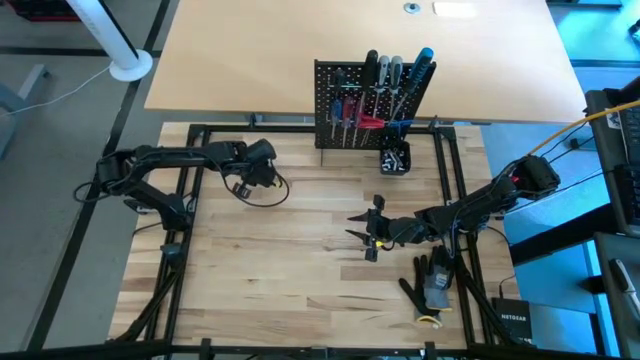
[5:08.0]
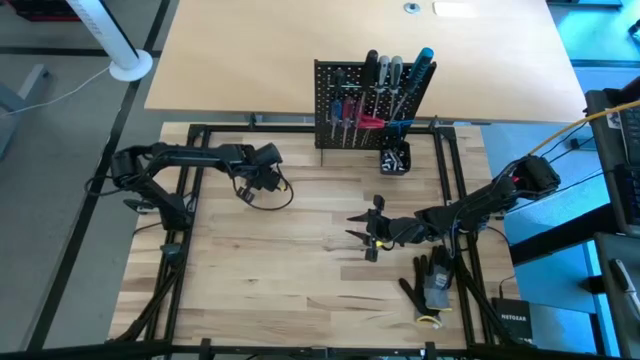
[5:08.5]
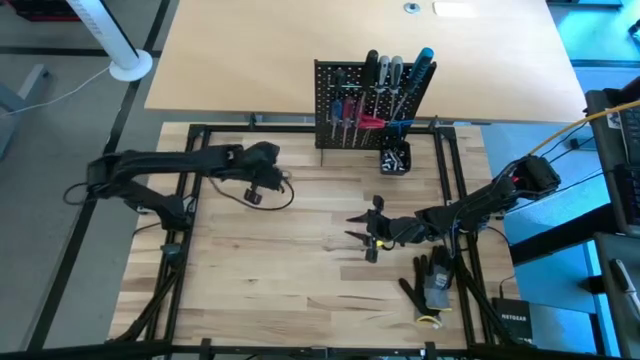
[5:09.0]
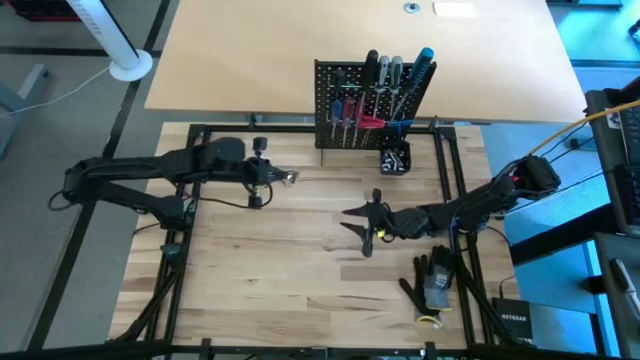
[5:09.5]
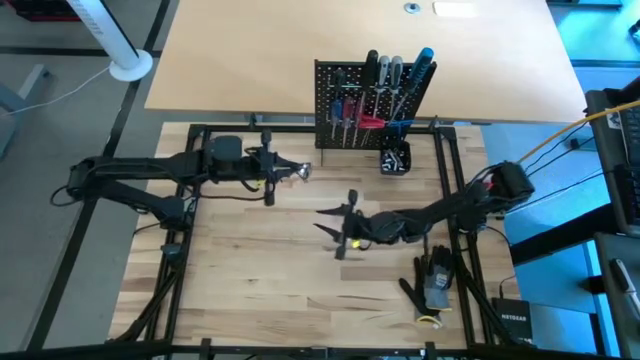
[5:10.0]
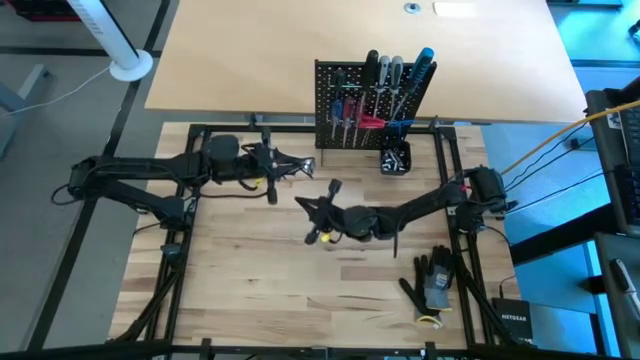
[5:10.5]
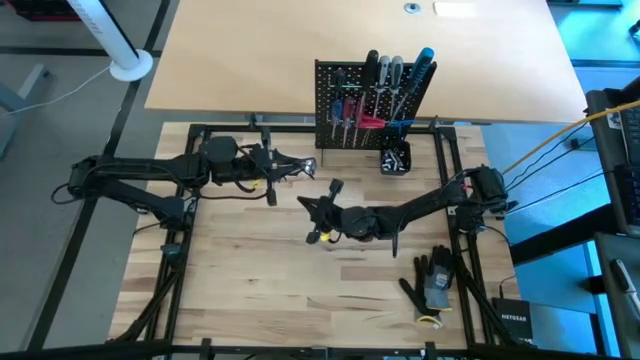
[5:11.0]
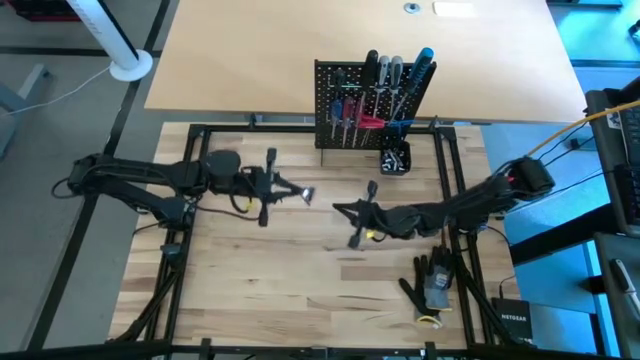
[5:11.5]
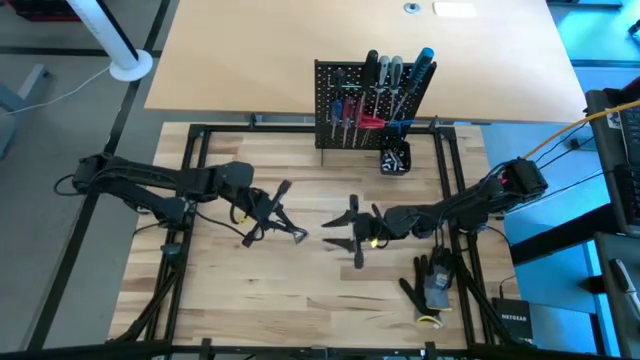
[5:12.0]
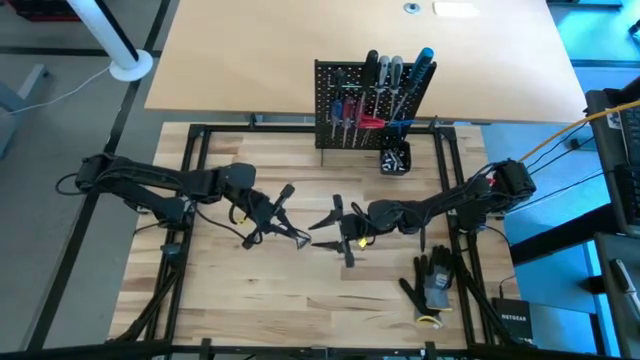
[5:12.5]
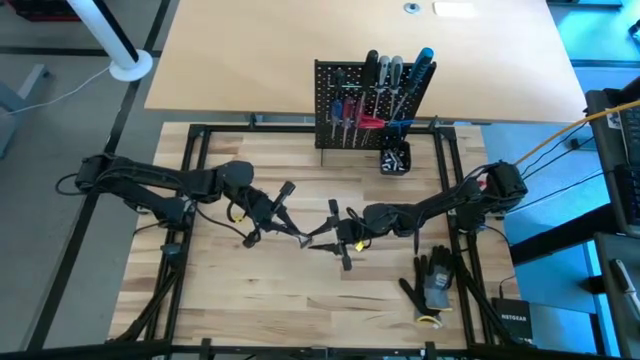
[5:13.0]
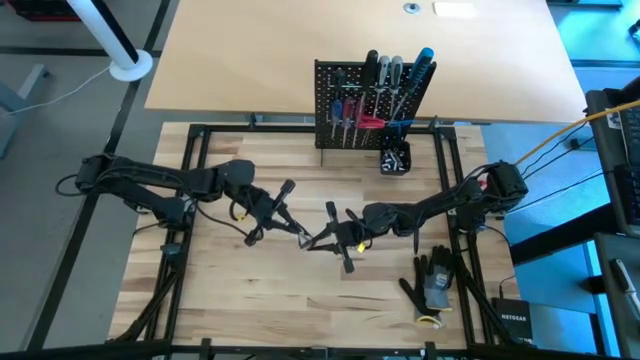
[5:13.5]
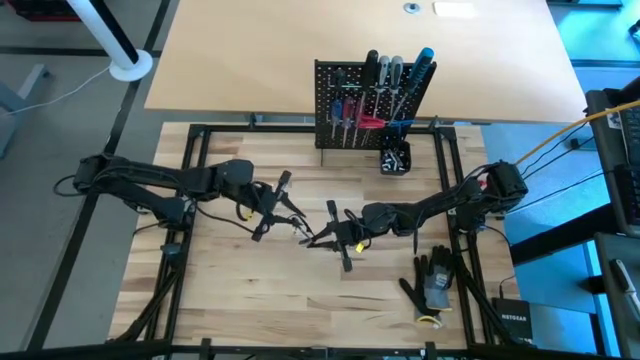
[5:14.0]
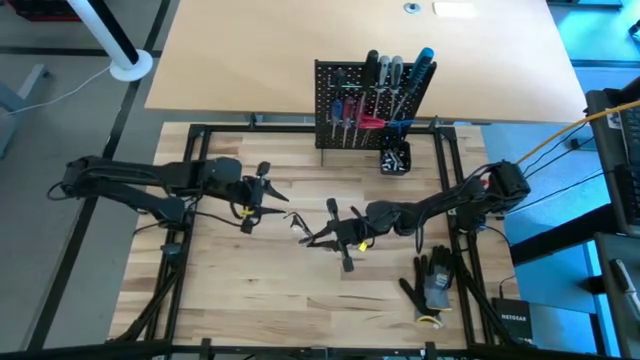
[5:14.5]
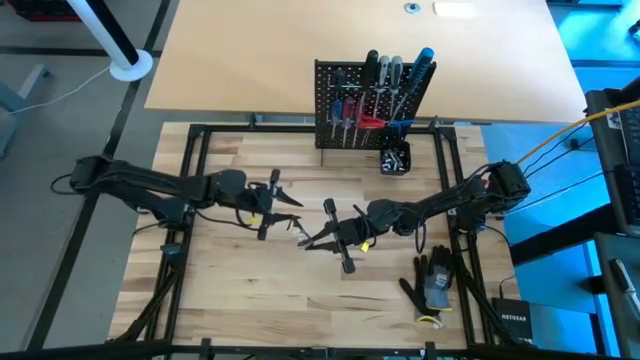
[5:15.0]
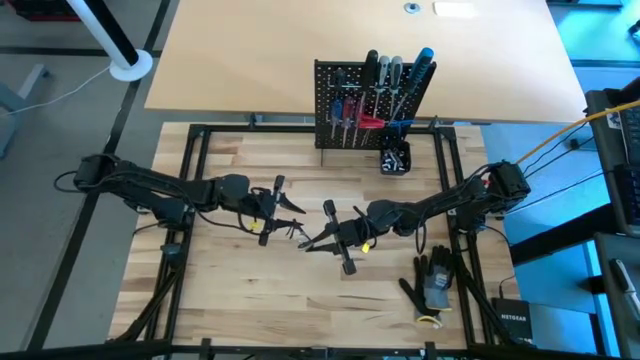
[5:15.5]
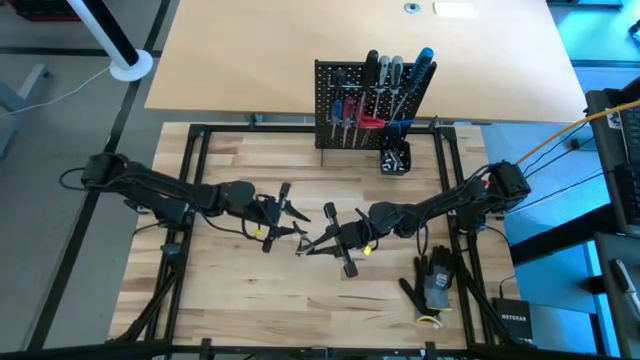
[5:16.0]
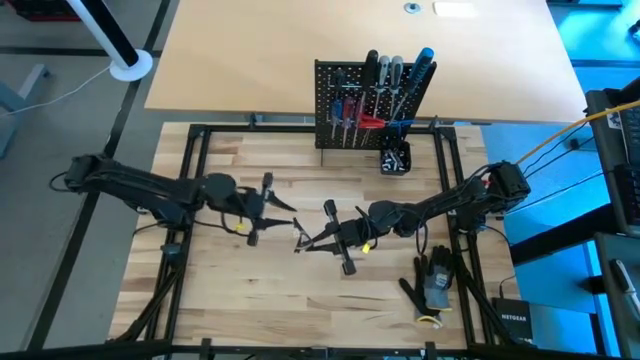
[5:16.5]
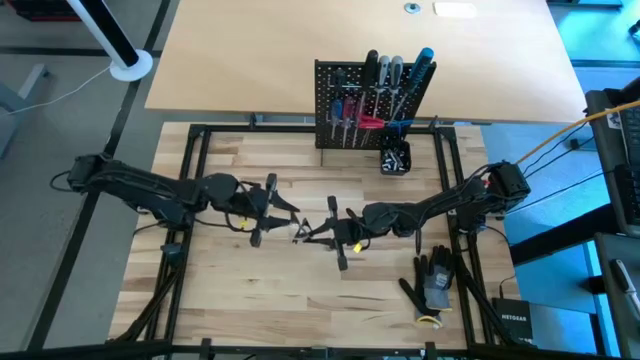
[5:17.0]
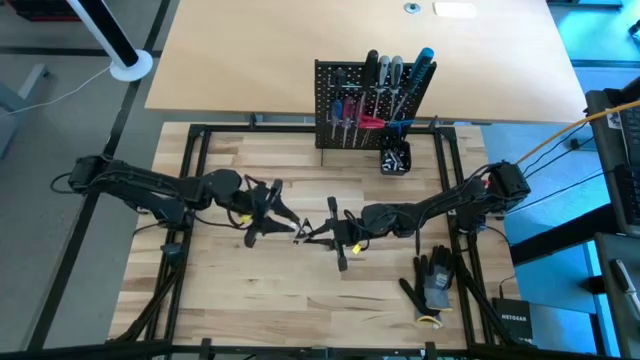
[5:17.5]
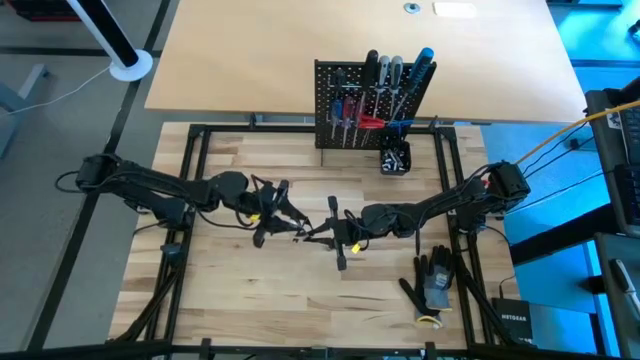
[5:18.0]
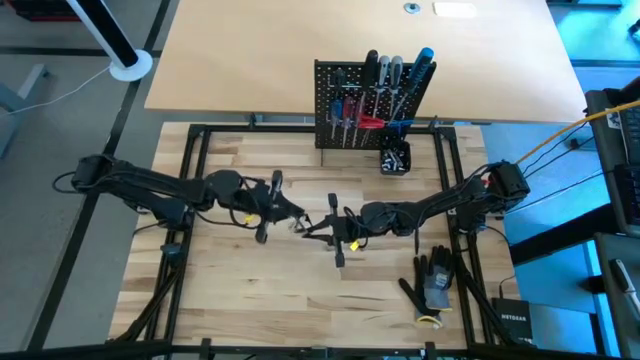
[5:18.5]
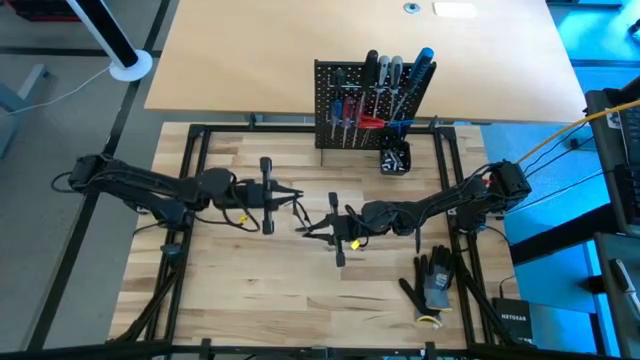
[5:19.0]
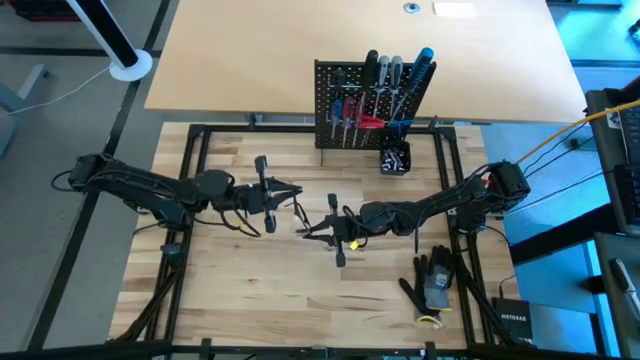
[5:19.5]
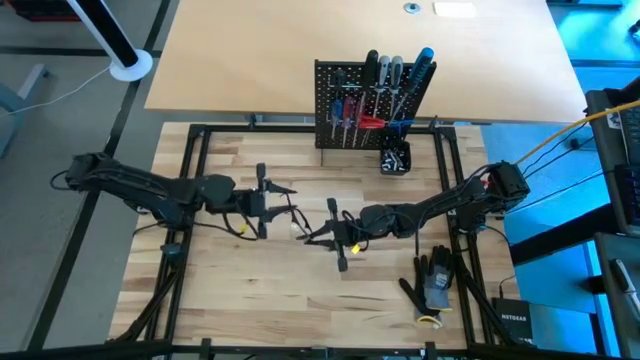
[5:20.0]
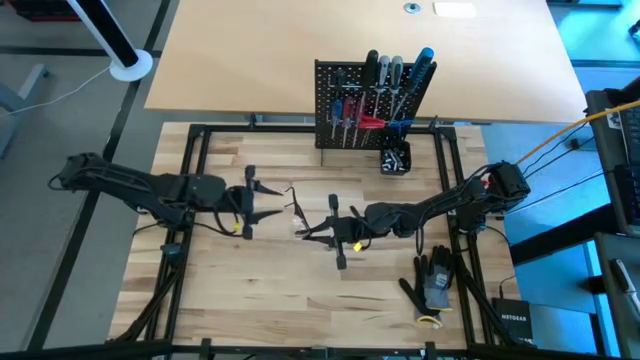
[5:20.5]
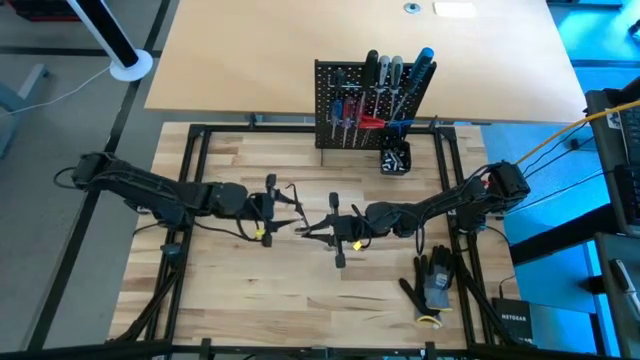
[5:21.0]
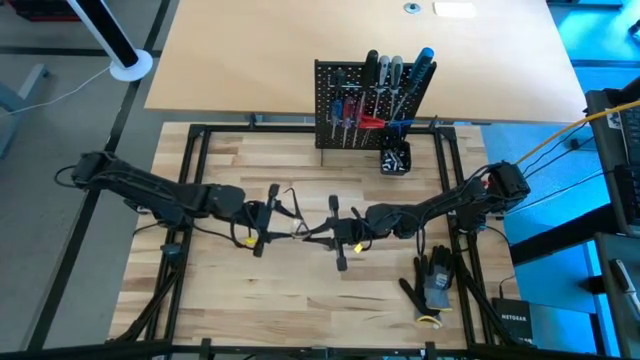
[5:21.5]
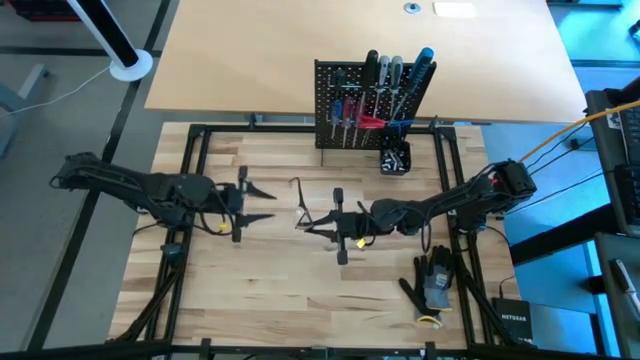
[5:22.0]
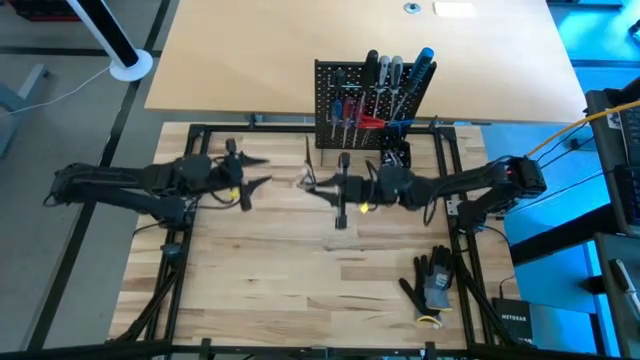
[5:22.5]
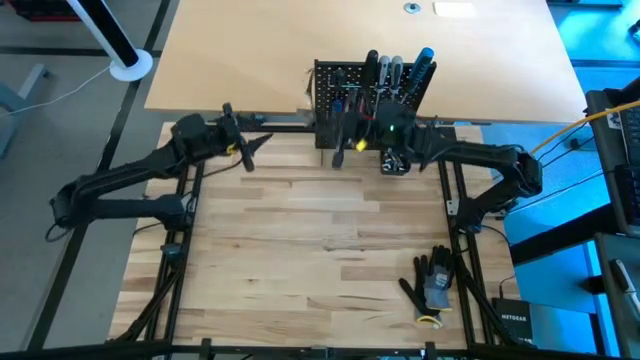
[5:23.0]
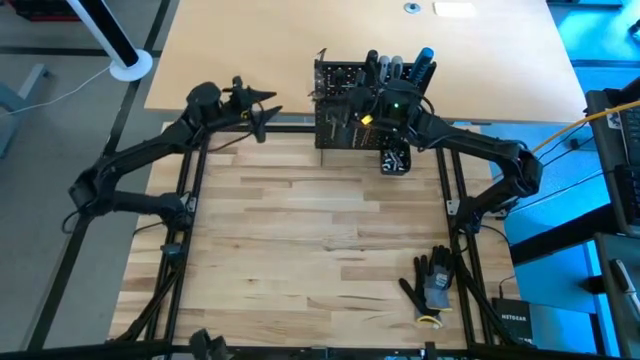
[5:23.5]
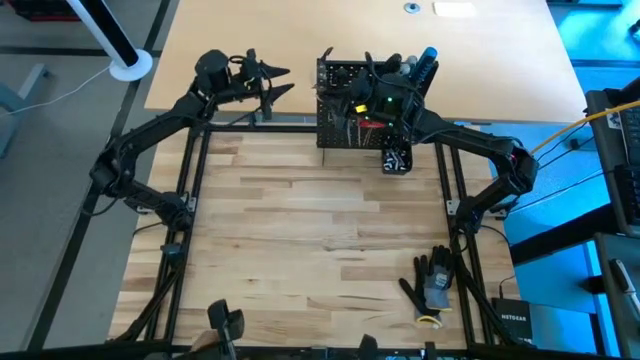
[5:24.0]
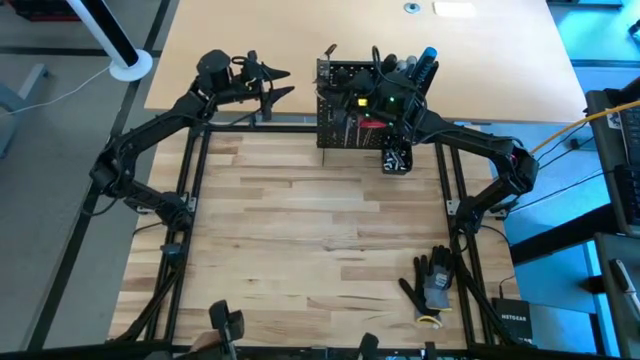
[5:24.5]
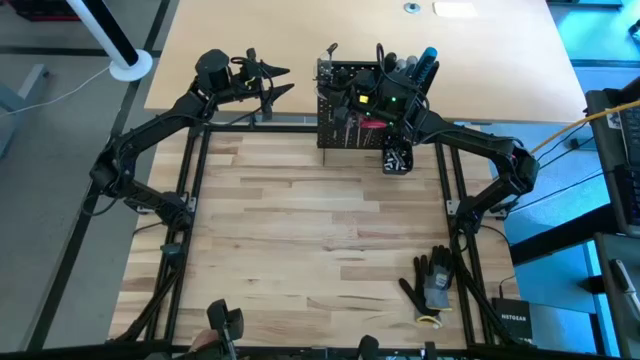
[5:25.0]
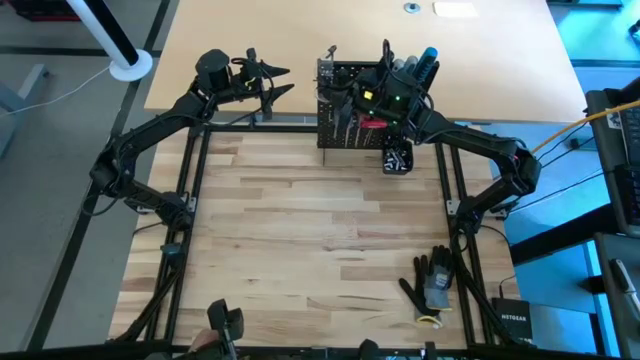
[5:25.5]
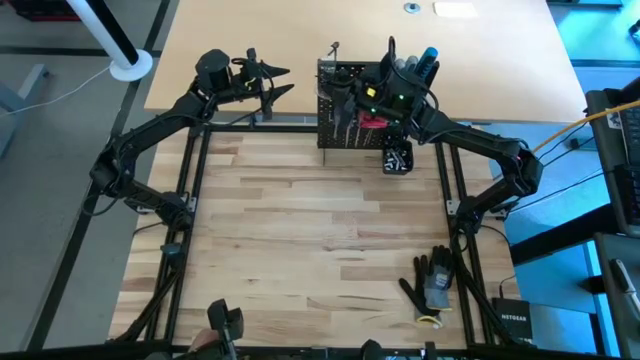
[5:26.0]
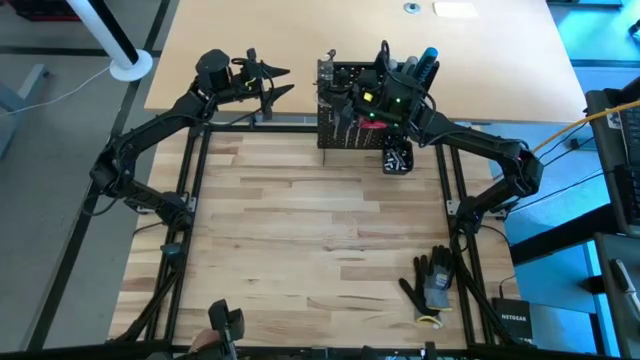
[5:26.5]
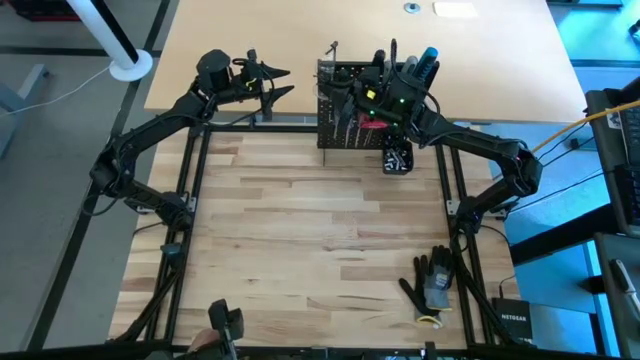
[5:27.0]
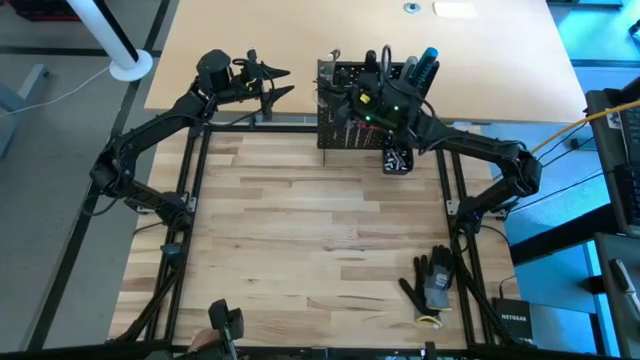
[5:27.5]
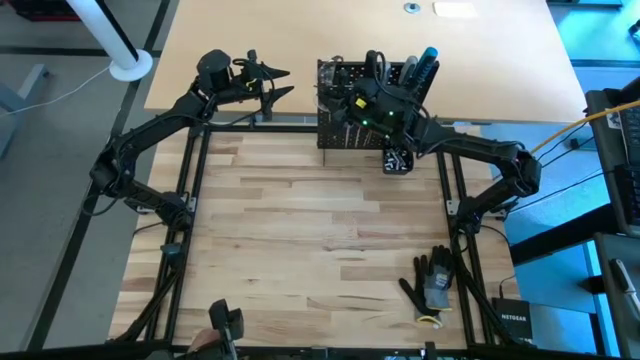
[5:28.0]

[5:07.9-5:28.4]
Task: Hang tools onto peg board
Hang the black safety glasses on the peg board

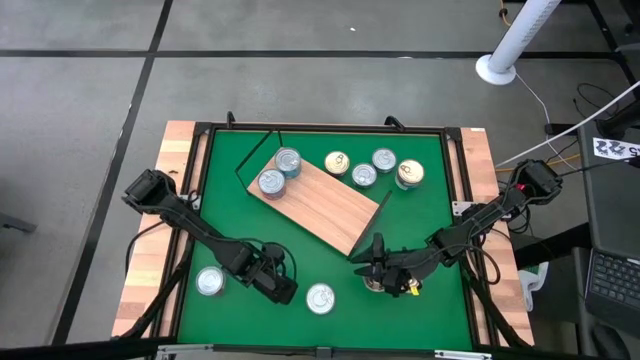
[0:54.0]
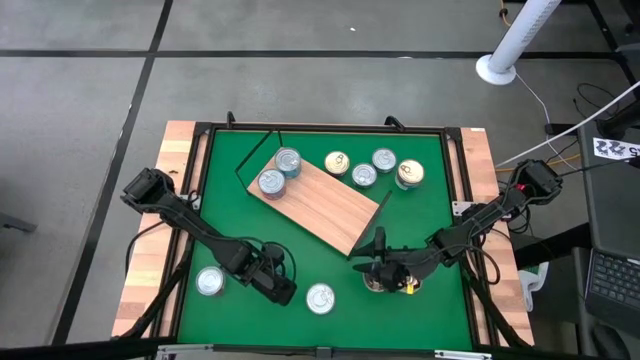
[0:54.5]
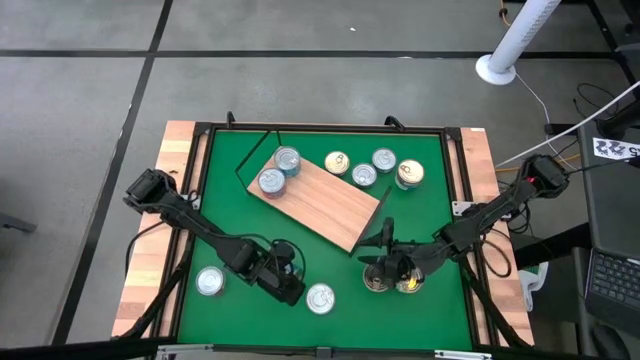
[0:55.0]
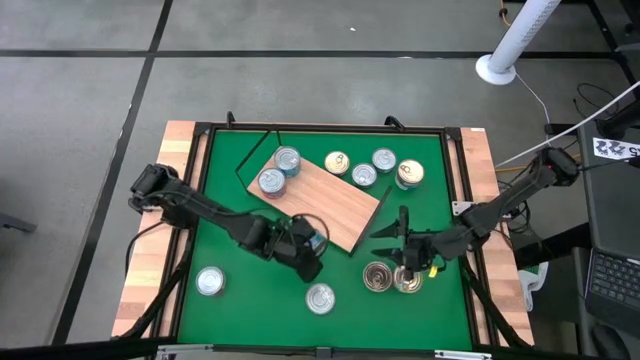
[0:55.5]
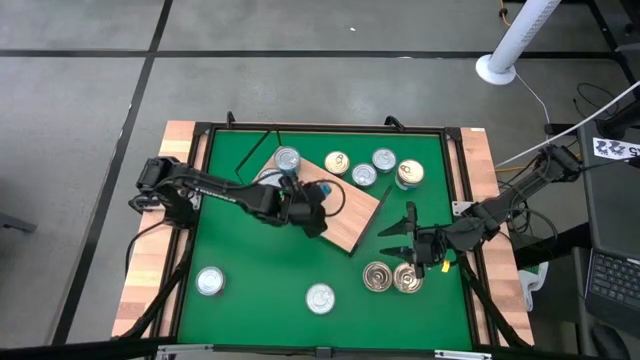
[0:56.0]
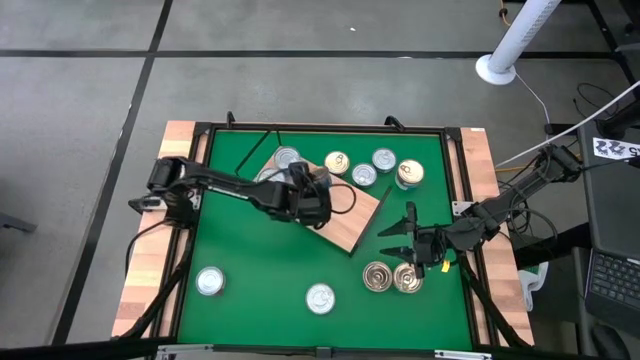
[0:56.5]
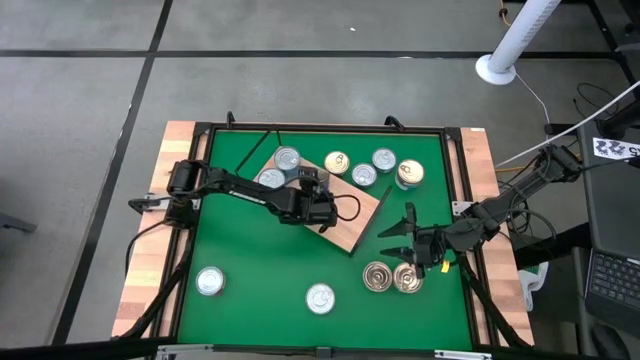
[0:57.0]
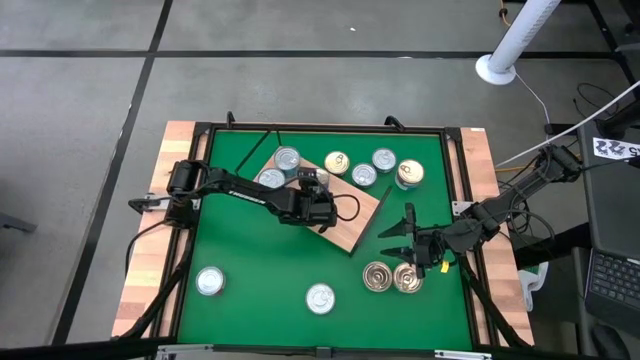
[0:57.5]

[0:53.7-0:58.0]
Task: Stack canned seafood by type on shelf
Put the blue and pink tuna can on the shelf
